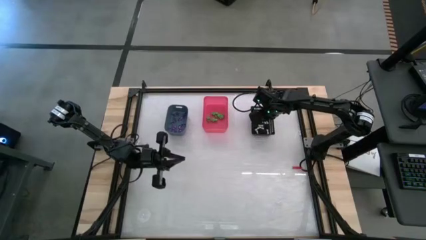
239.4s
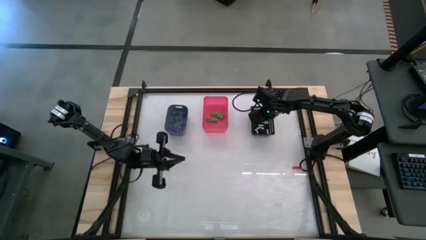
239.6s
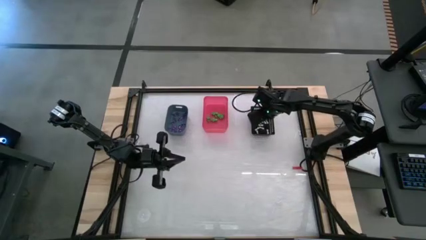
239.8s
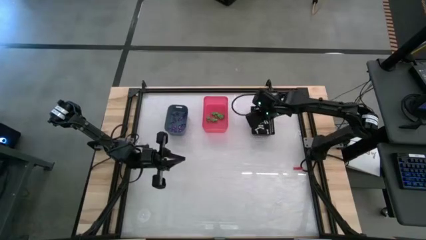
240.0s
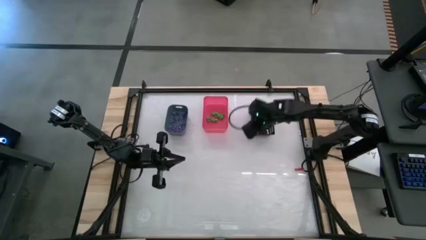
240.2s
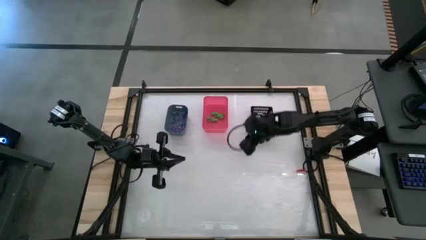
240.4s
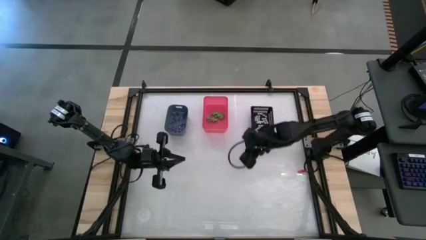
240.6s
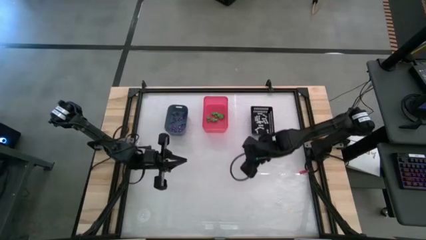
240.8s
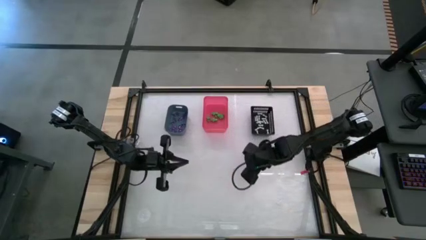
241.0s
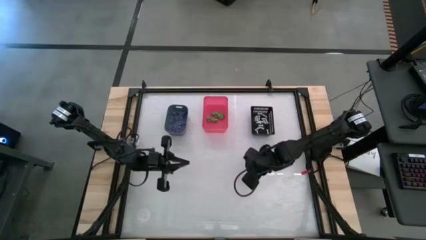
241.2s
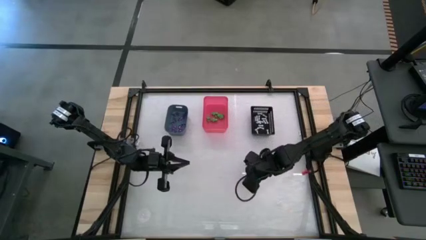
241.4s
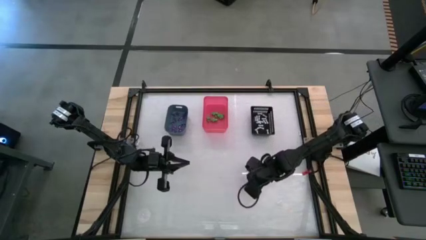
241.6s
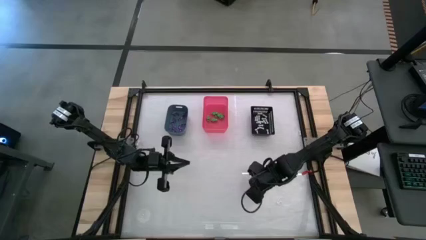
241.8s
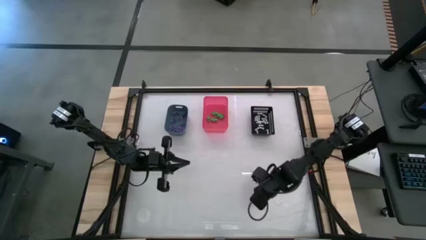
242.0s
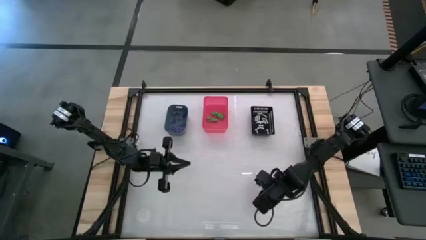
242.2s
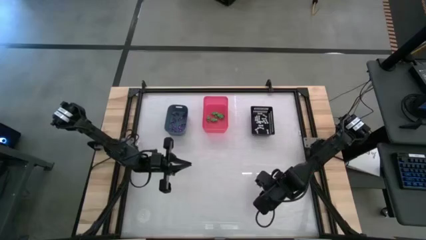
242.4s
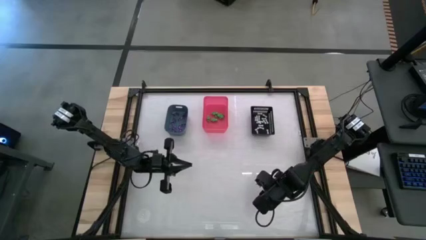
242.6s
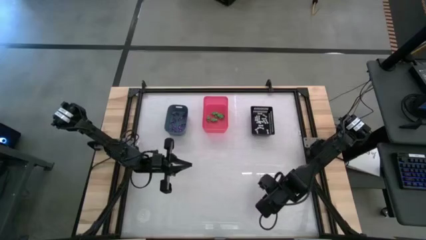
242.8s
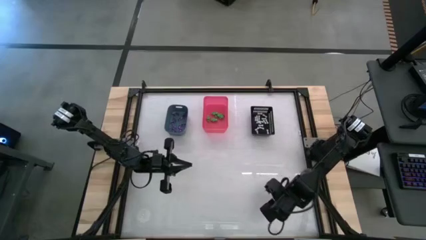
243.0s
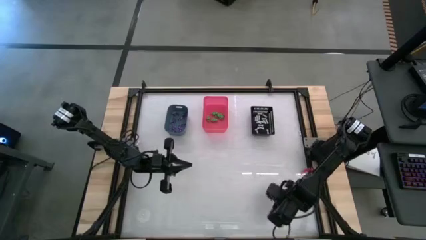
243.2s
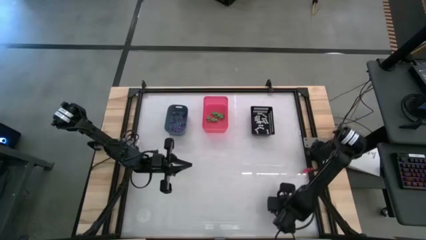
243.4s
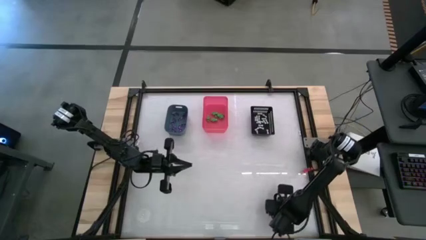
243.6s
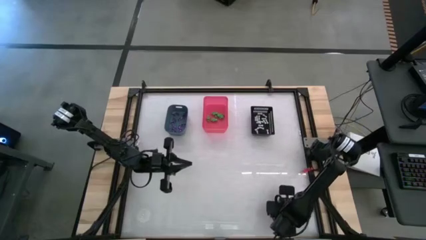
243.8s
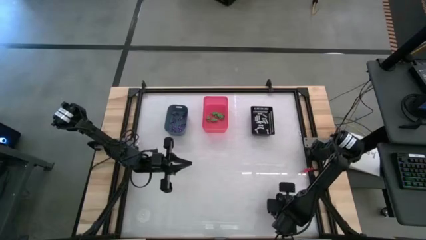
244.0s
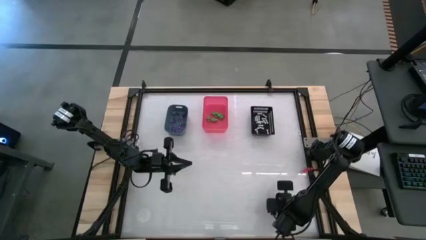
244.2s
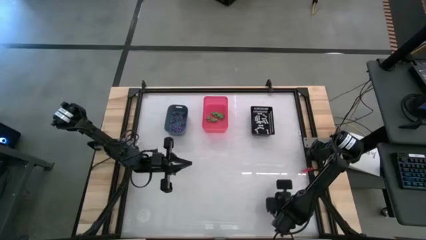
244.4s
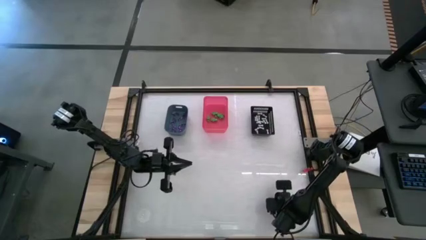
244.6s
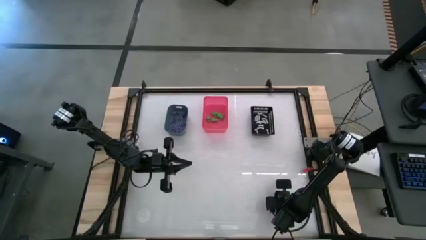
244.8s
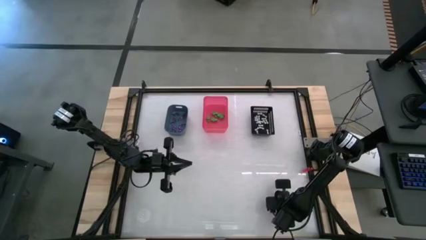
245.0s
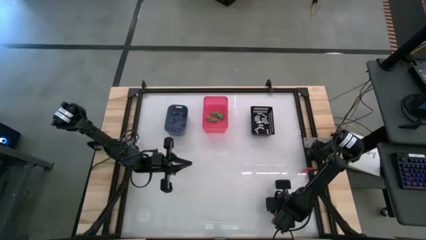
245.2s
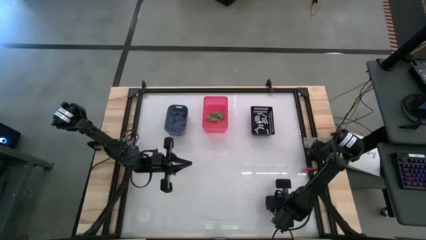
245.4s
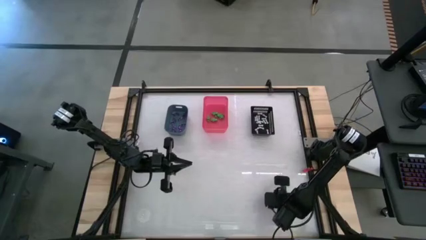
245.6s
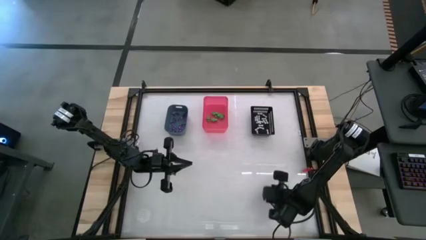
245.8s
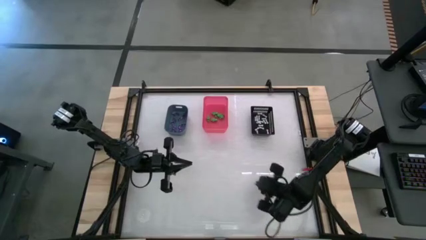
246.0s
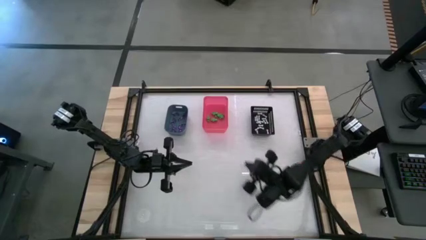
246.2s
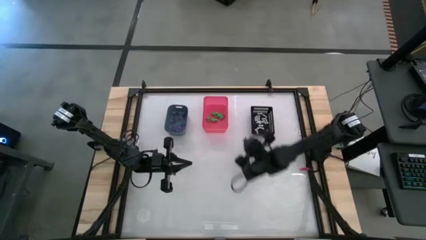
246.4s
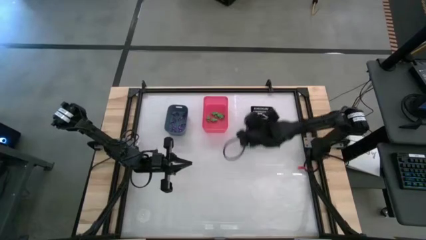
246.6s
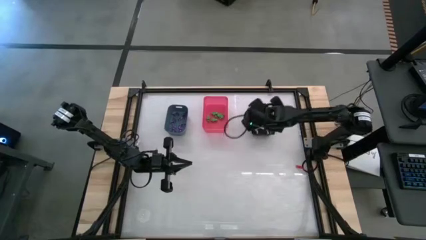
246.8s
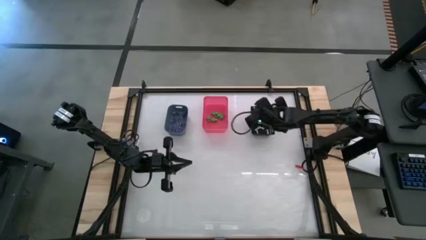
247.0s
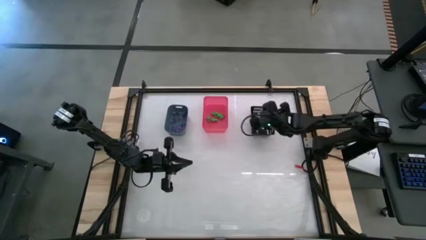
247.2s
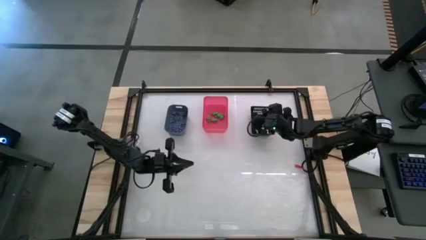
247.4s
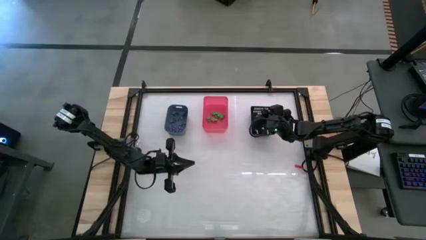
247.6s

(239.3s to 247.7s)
Task: Sort Halloween decoration
Put the white bone toy into the black bin

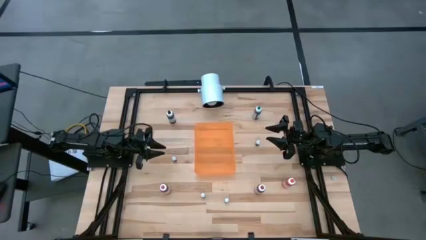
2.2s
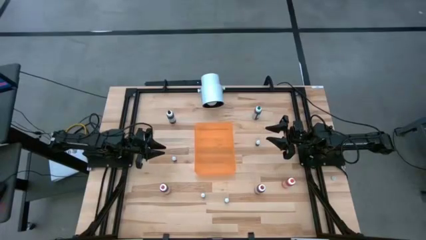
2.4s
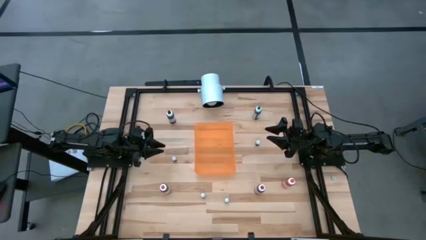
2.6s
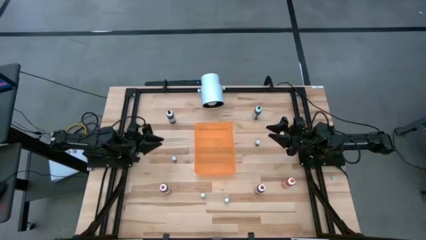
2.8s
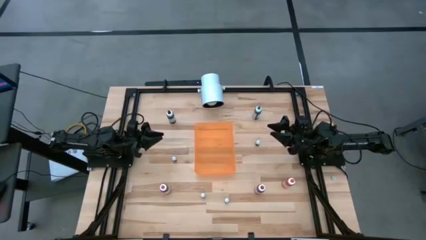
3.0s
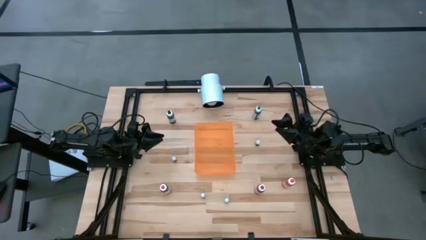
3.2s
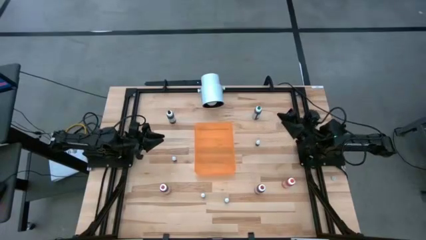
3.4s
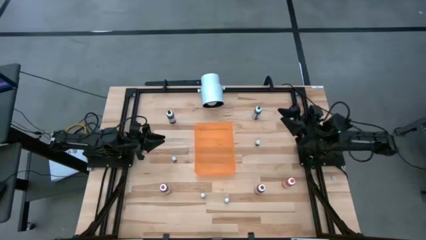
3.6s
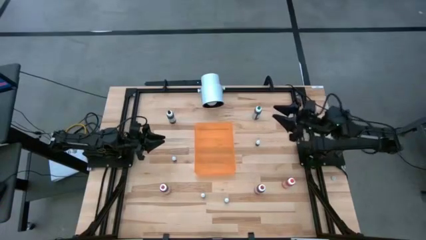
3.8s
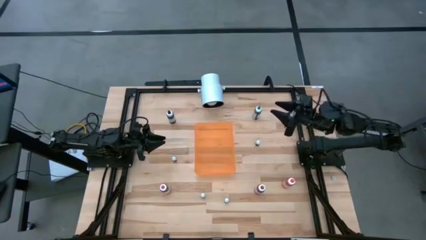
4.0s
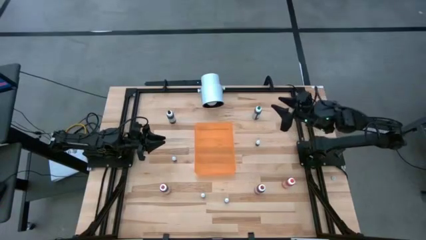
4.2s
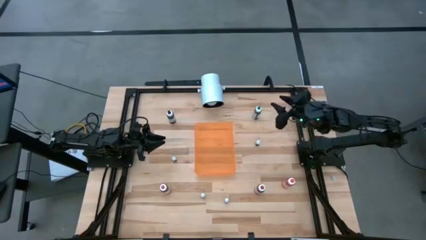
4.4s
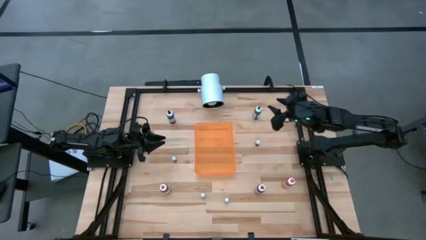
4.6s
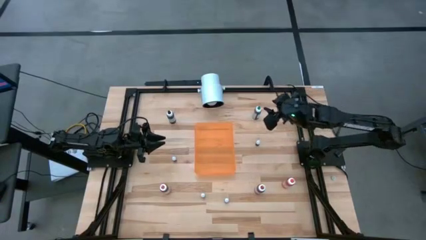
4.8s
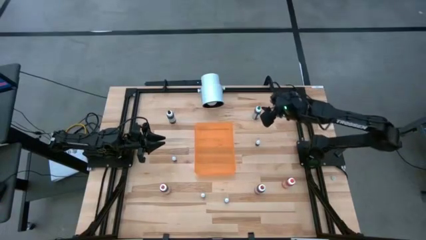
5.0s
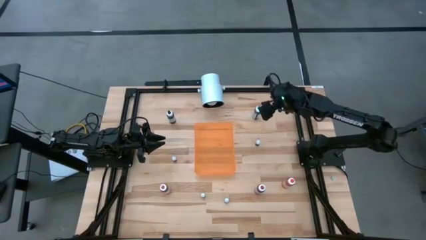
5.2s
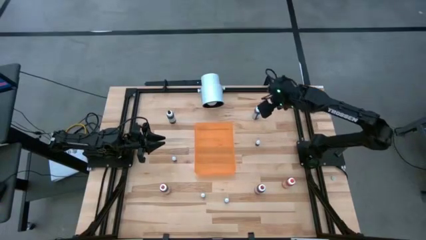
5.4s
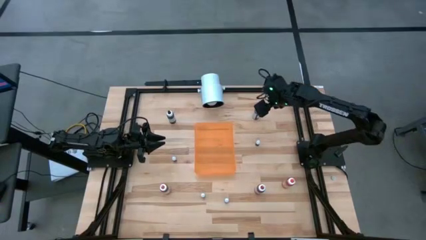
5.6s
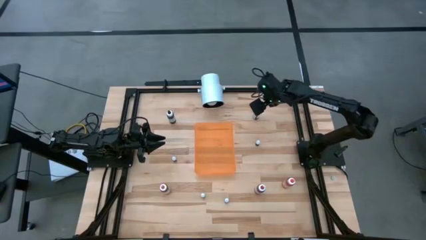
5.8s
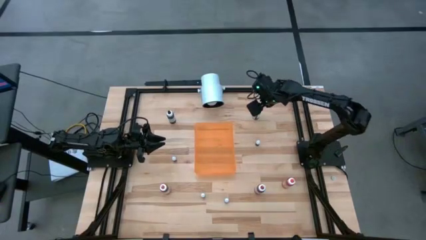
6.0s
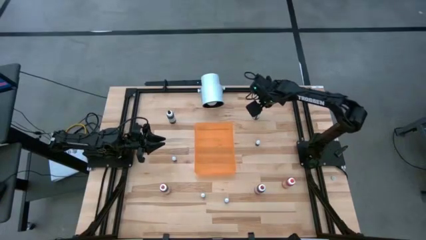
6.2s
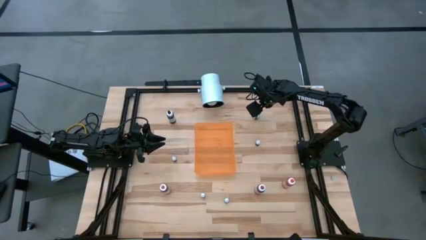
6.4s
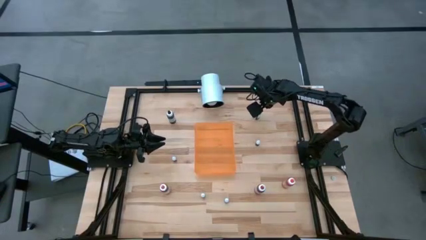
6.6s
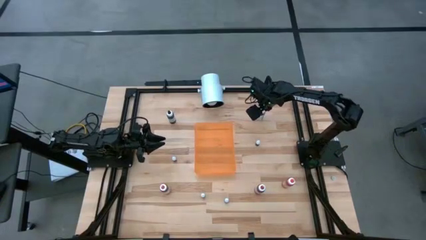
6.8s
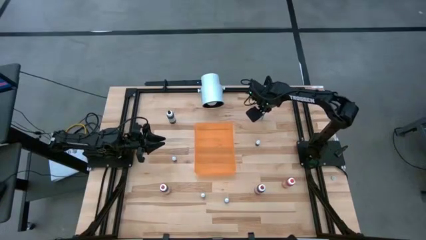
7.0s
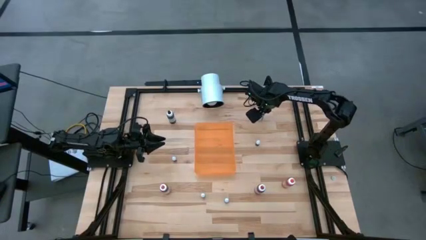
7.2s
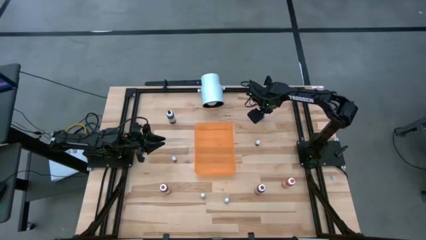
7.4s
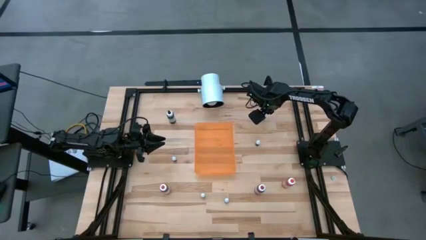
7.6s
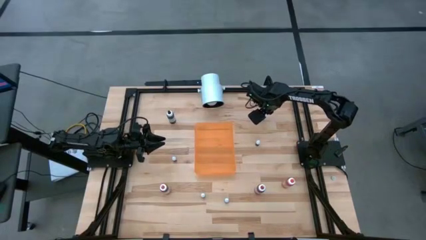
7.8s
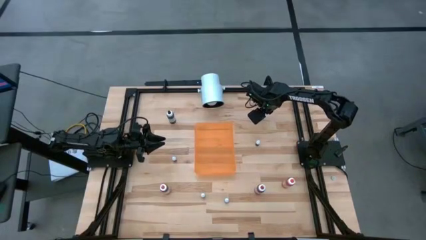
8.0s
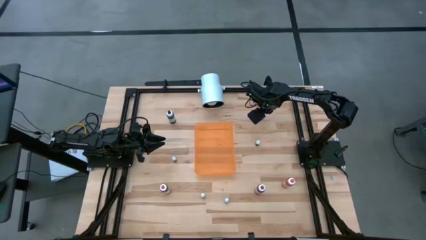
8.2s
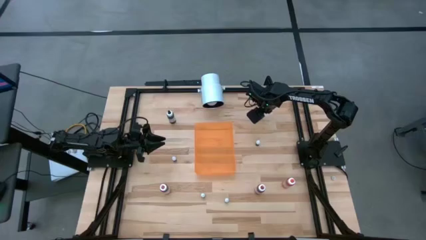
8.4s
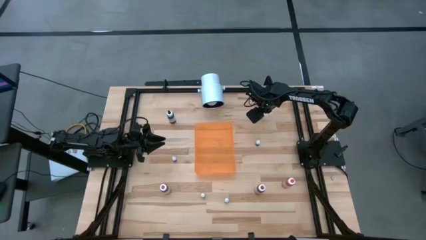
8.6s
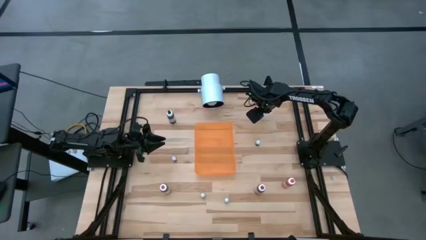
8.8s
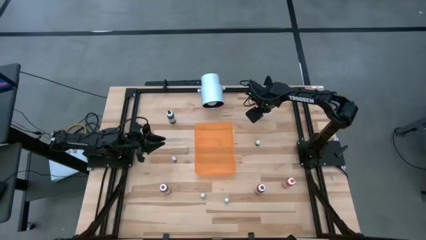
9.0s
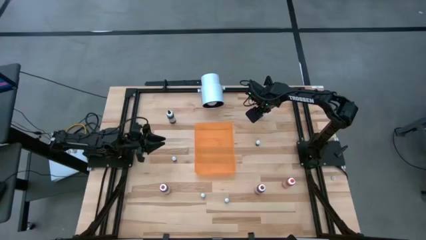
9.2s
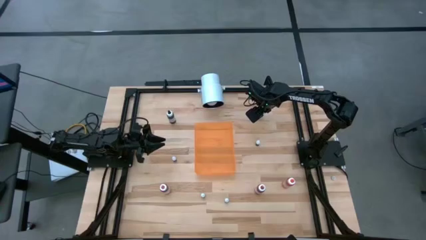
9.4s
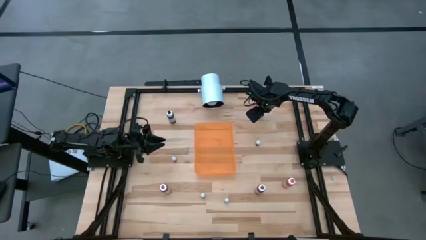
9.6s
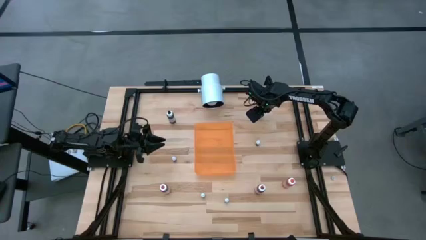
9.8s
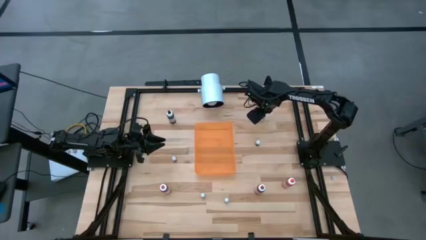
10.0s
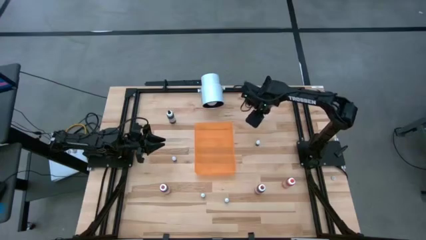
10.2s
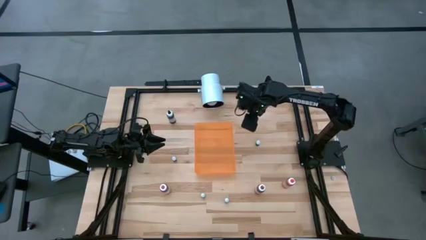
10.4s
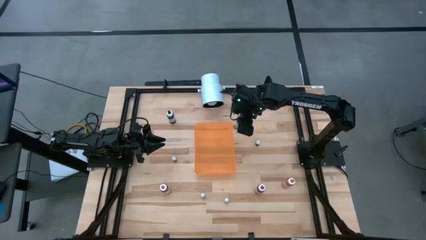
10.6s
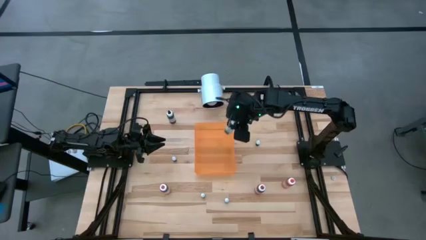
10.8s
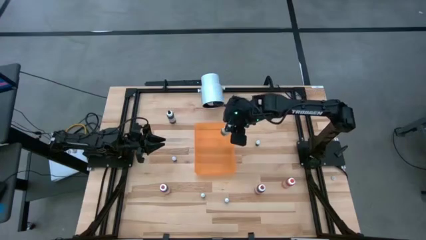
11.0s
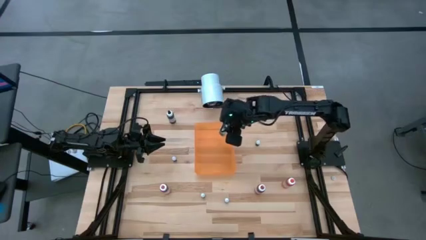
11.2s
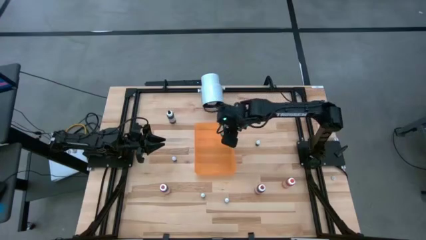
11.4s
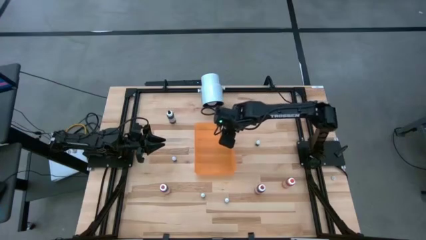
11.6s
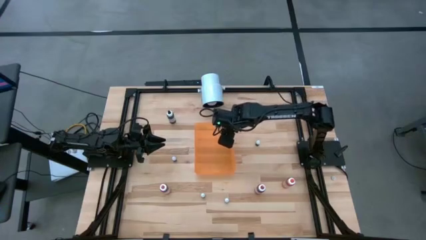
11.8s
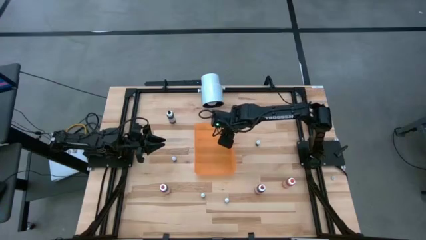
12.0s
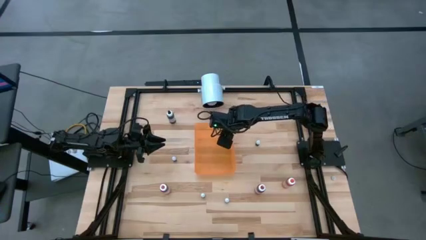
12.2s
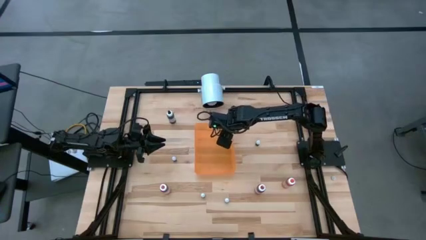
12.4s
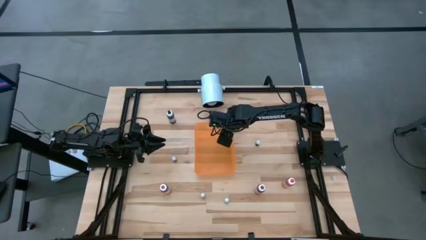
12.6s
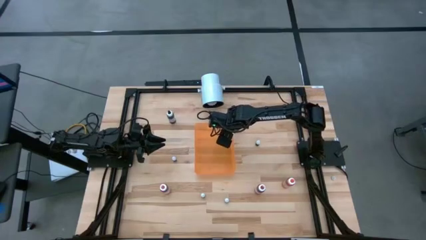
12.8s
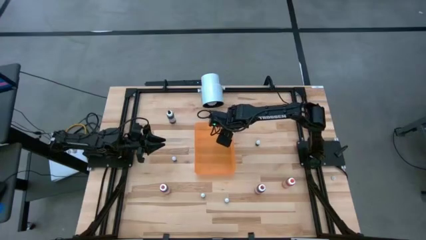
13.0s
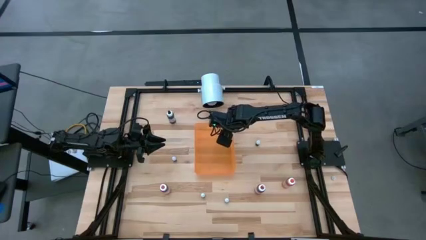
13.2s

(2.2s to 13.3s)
Task: Pick & Place food coloring
Put the large green food coloring bottle into the bin
